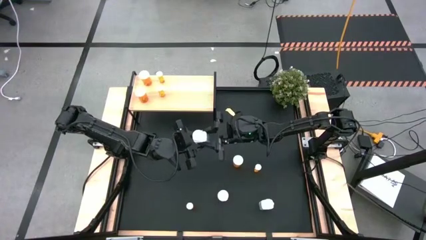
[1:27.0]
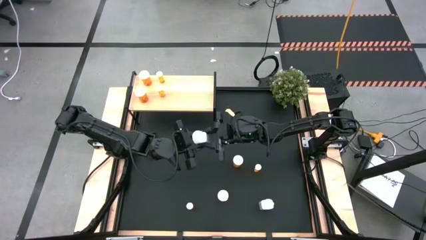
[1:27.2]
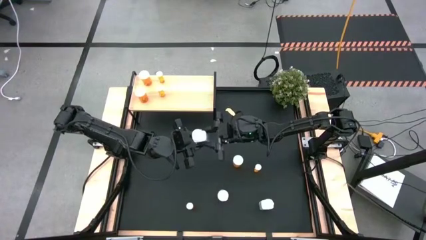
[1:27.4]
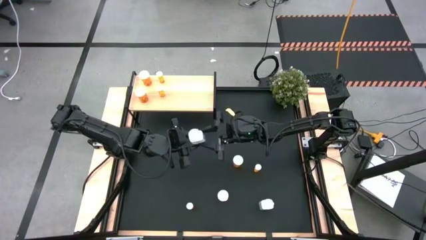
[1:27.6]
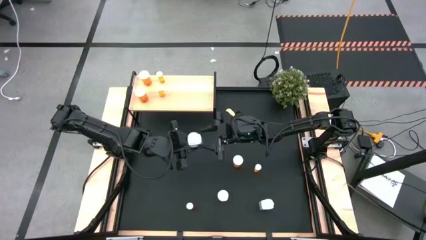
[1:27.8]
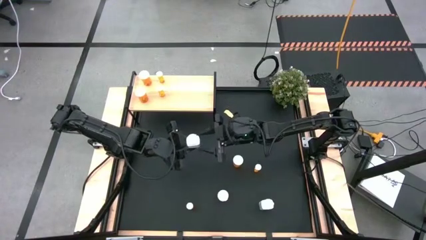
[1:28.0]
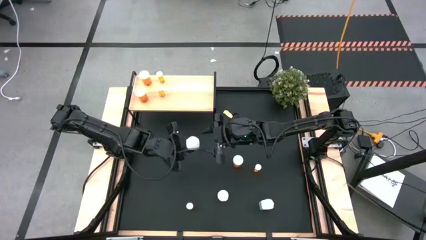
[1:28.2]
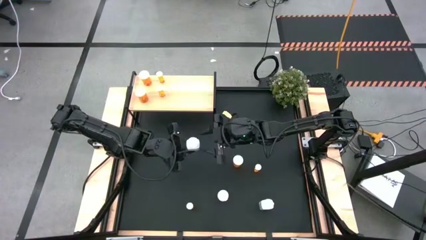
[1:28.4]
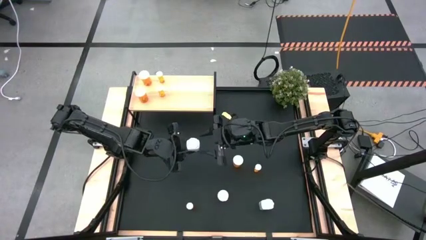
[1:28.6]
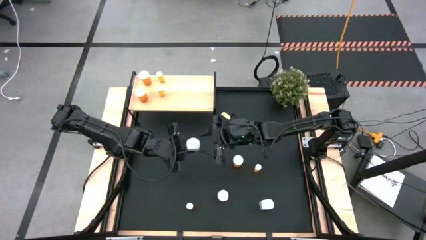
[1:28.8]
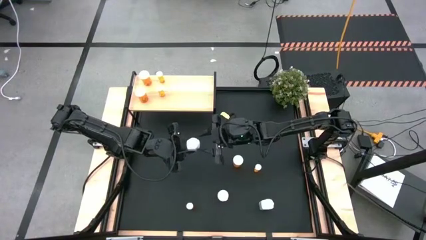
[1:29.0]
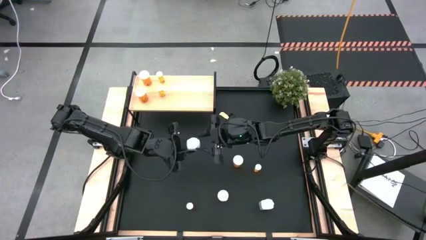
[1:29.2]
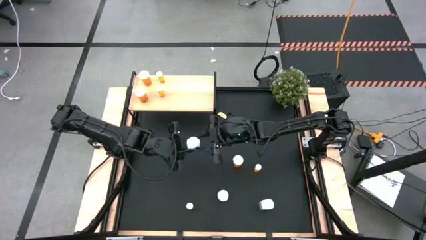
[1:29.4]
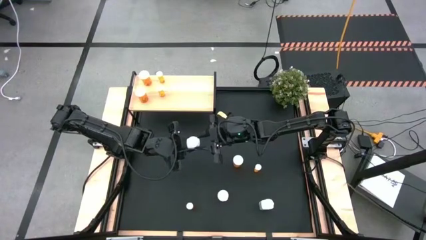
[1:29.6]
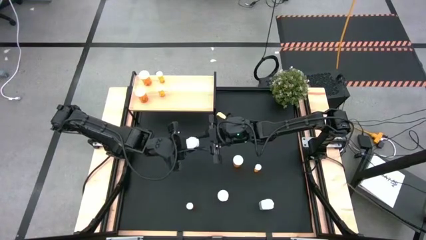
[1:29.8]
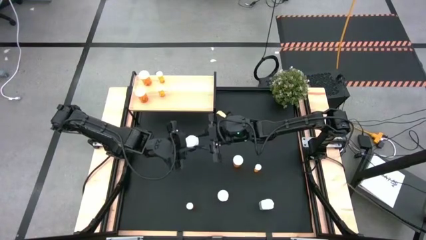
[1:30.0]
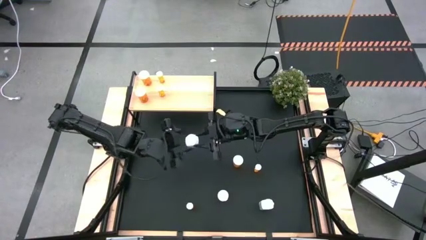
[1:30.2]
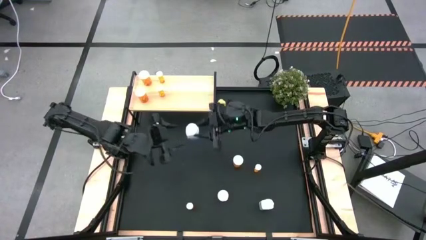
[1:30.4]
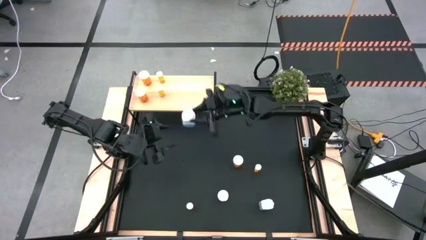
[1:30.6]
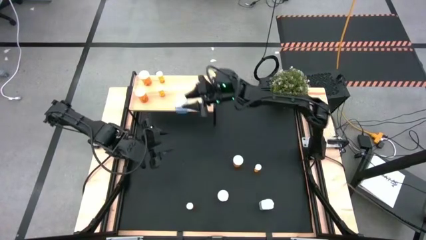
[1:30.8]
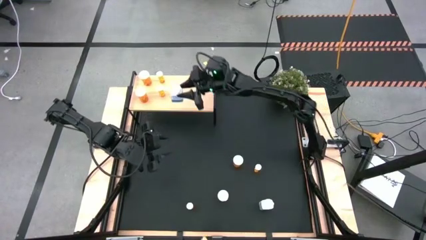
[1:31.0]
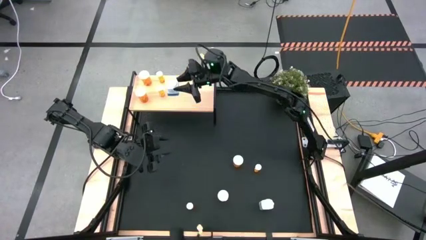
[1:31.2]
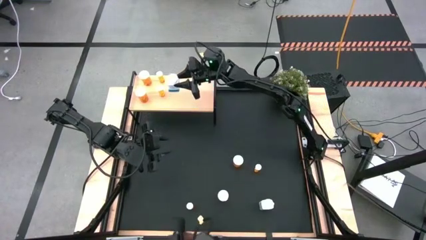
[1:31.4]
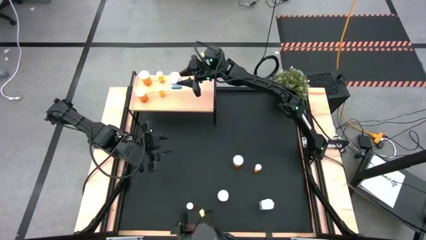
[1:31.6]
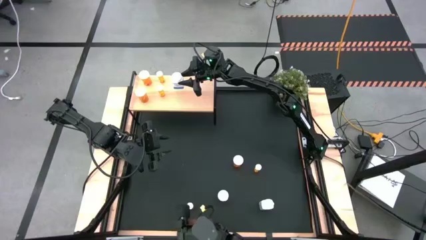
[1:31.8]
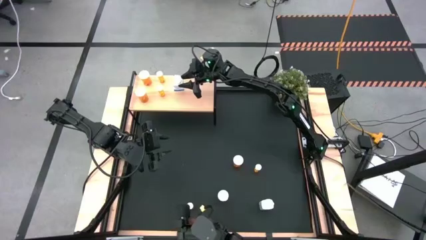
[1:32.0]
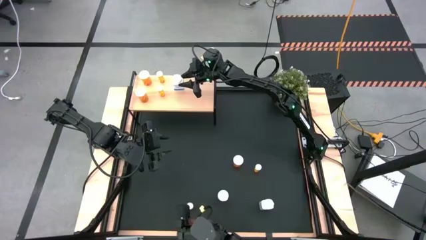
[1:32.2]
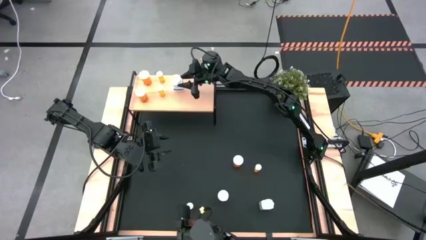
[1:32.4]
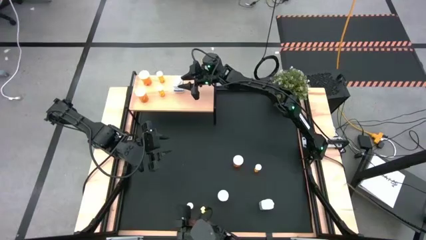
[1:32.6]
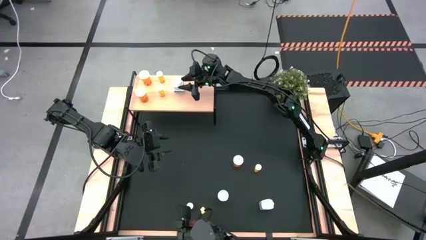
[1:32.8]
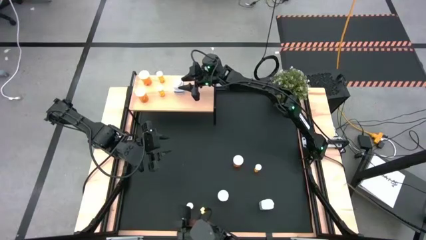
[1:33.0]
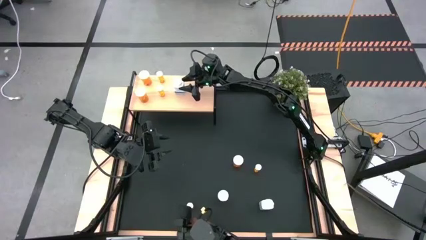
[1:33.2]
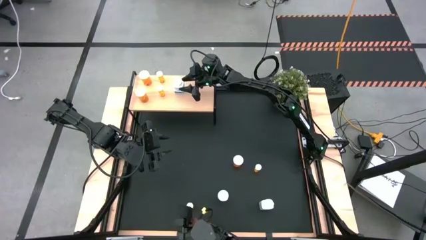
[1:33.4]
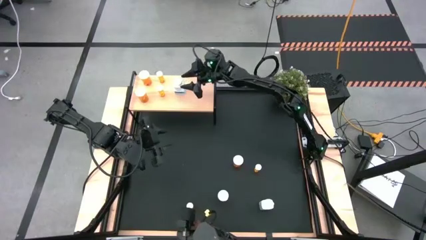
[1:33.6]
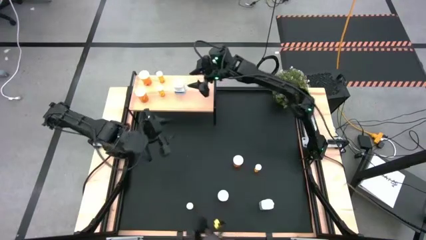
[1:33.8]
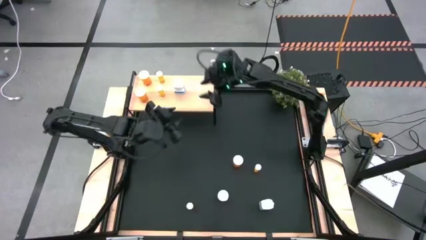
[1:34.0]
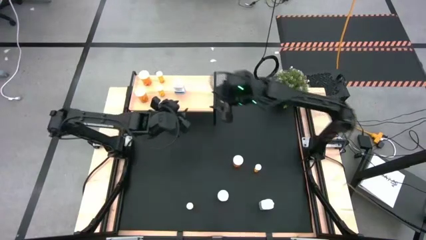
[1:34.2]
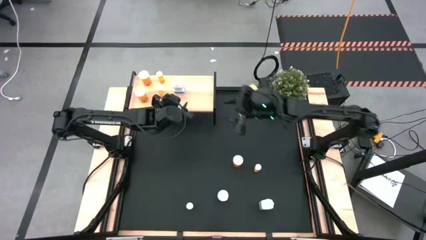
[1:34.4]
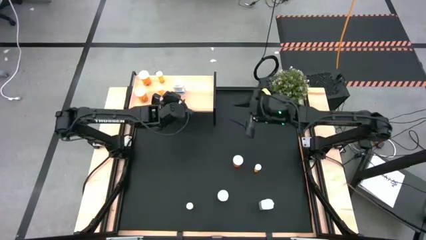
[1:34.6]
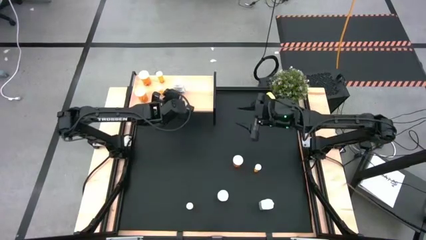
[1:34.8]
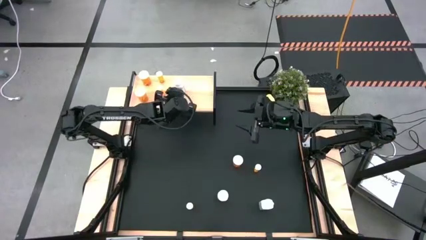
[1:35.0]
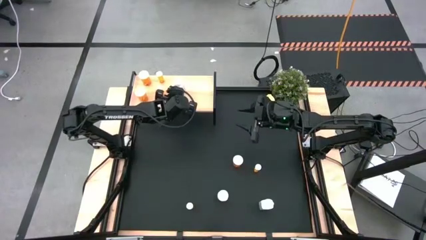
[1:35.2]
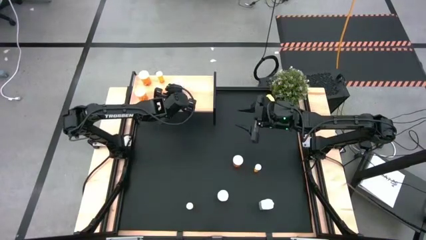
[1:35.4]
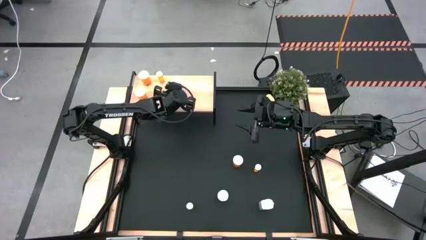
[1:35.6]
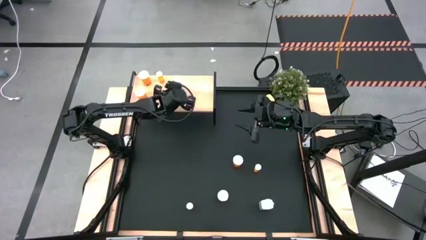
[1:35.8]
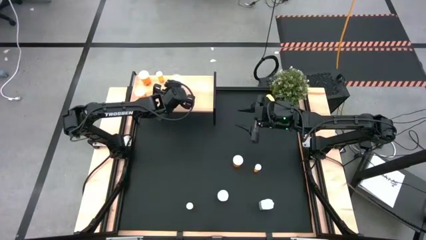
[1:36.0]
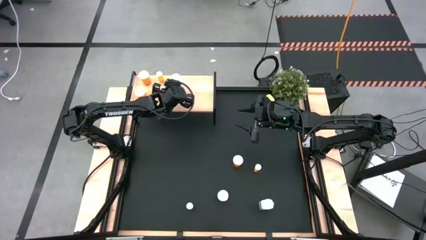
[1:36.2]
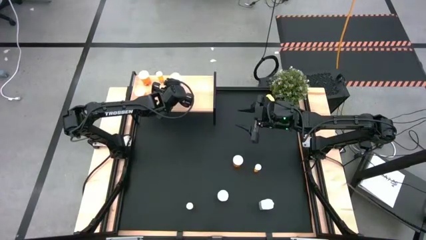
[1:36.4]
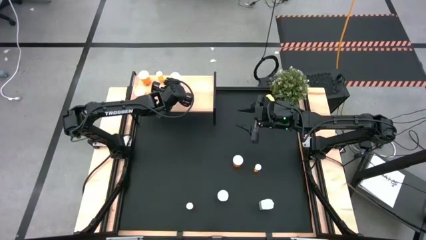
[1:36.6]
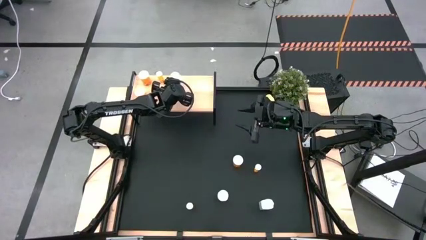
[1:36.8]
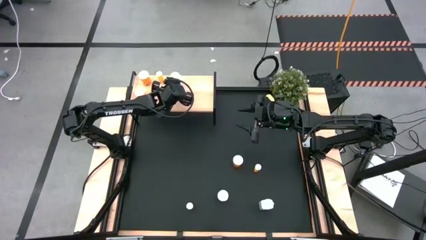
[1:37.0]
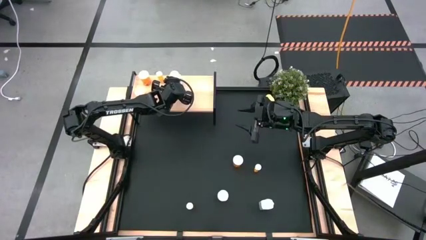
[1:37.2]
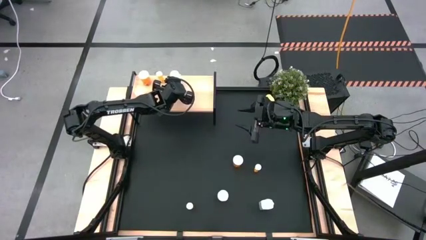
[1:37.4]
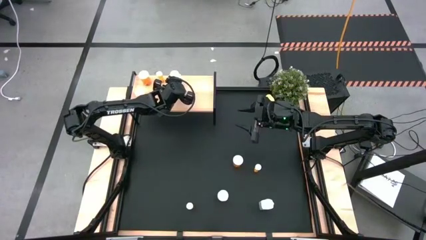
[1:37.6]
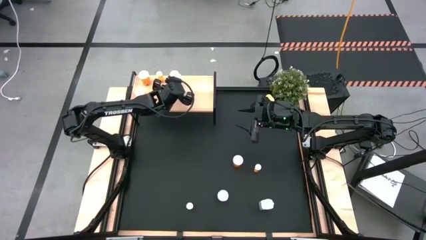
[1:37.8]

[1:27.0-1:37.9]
Task: Pick and place medicine bottles onto shelf by color
Put the white pill bottle on the shelf
